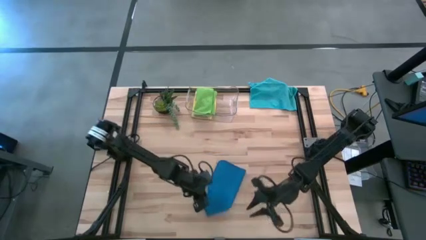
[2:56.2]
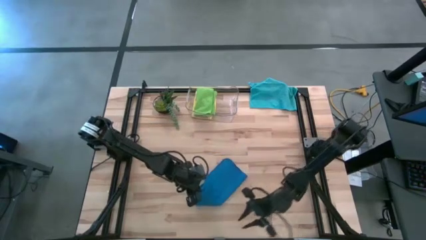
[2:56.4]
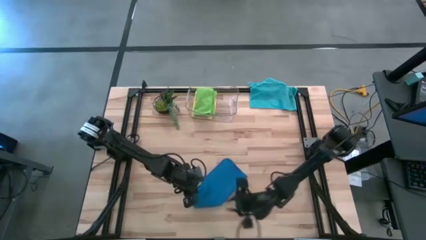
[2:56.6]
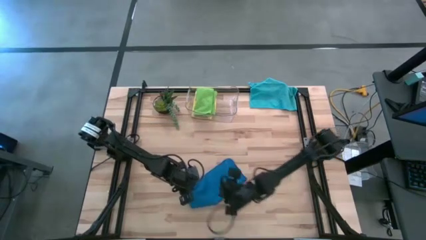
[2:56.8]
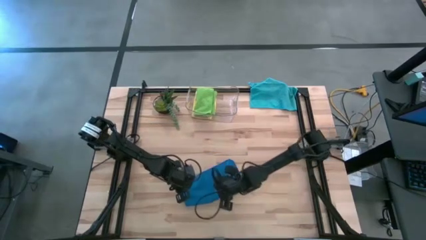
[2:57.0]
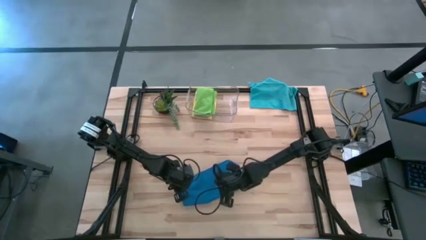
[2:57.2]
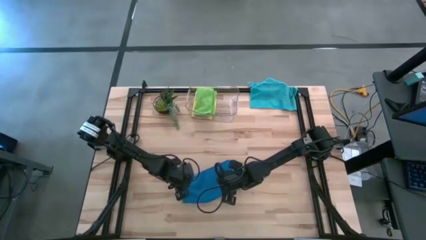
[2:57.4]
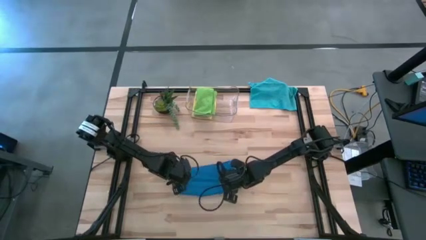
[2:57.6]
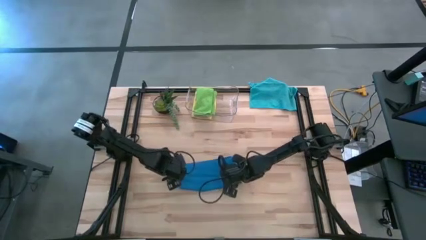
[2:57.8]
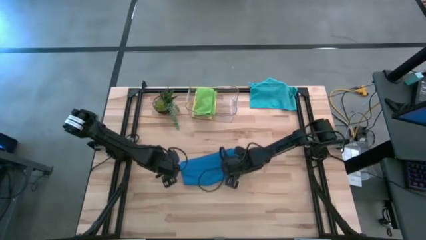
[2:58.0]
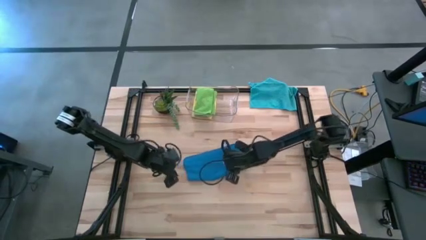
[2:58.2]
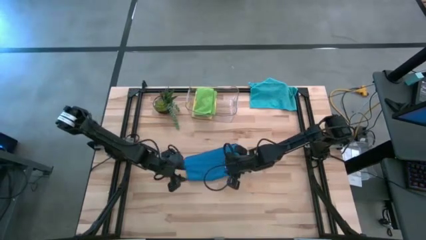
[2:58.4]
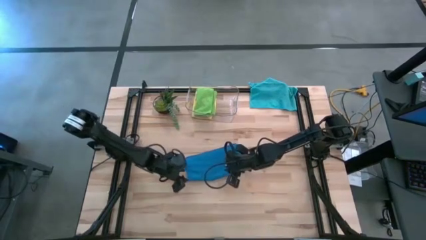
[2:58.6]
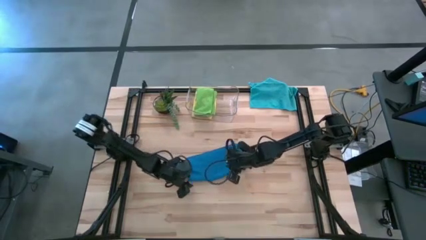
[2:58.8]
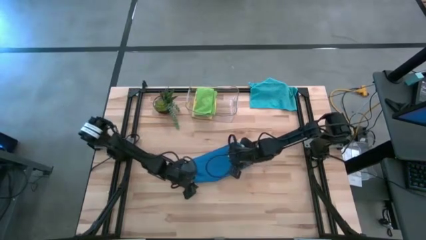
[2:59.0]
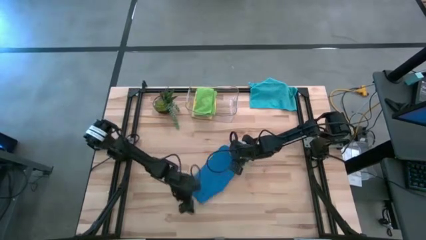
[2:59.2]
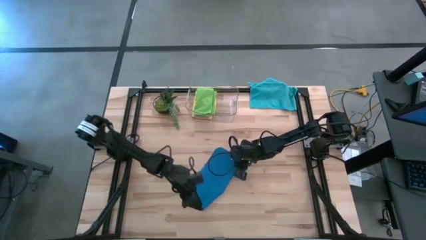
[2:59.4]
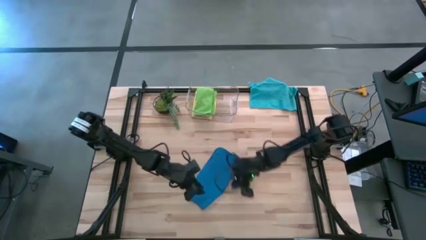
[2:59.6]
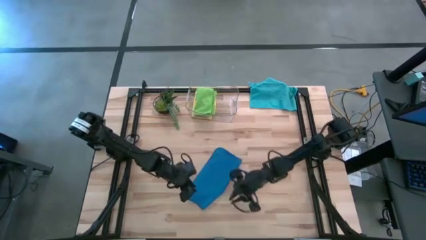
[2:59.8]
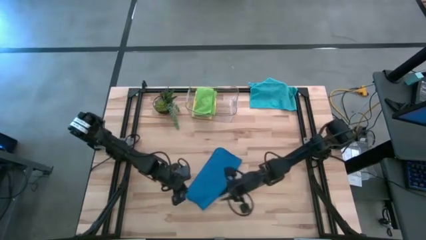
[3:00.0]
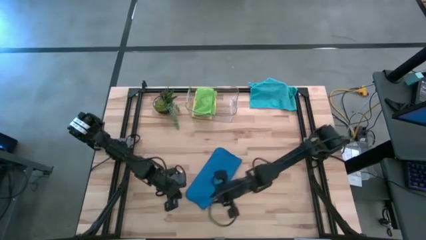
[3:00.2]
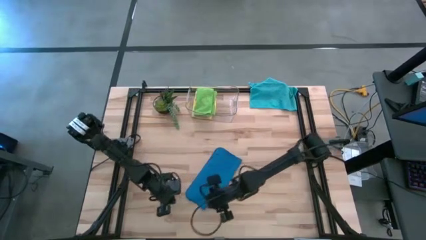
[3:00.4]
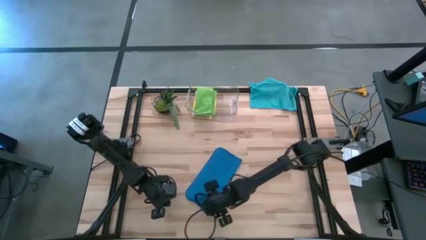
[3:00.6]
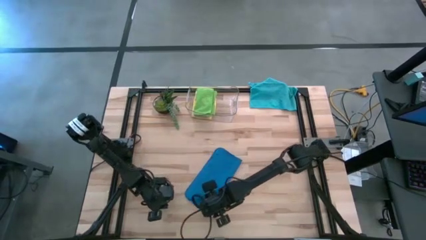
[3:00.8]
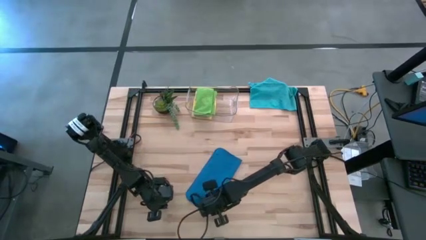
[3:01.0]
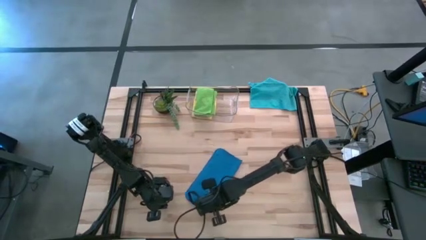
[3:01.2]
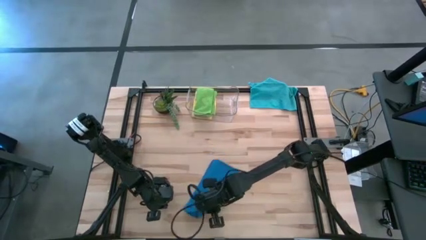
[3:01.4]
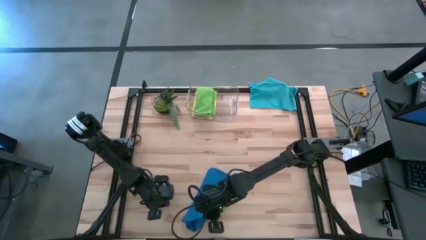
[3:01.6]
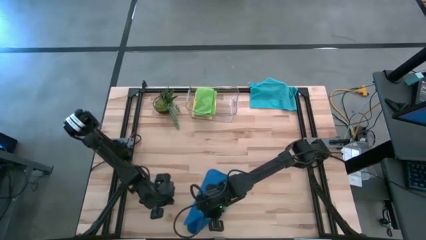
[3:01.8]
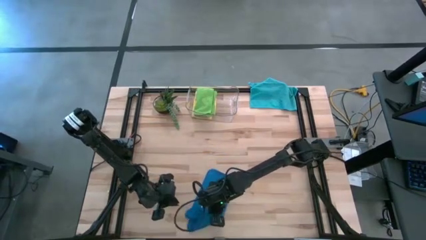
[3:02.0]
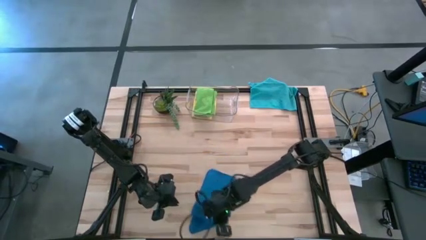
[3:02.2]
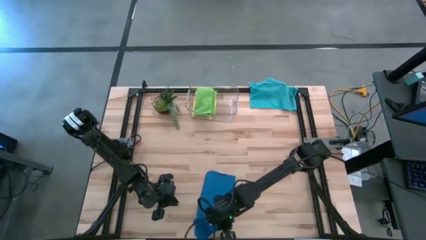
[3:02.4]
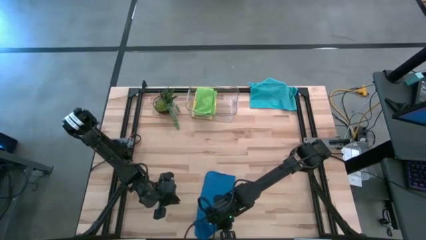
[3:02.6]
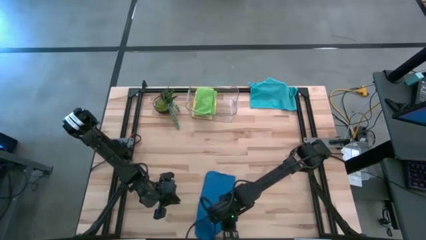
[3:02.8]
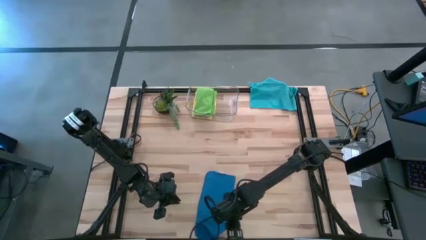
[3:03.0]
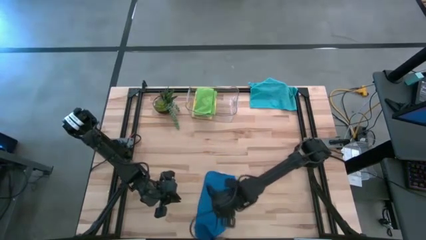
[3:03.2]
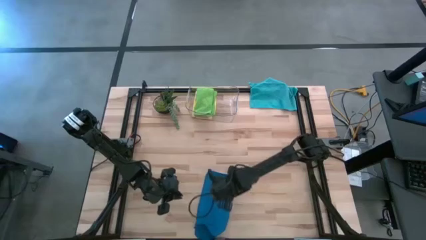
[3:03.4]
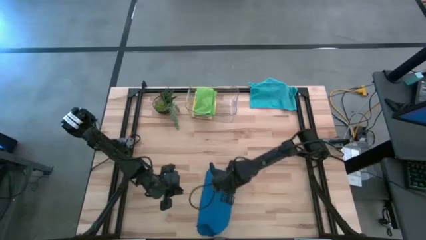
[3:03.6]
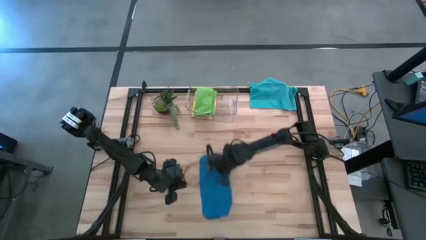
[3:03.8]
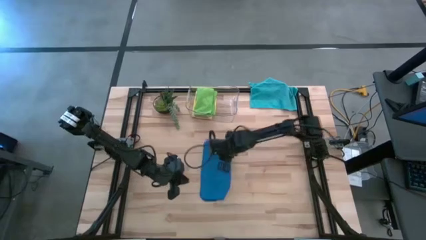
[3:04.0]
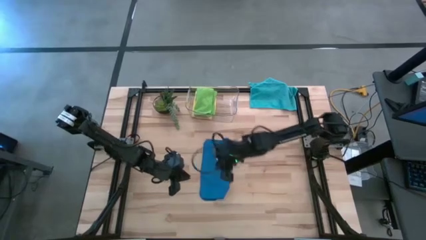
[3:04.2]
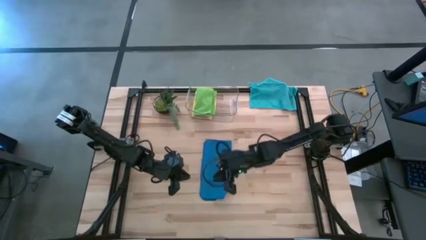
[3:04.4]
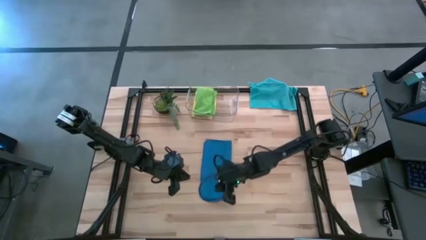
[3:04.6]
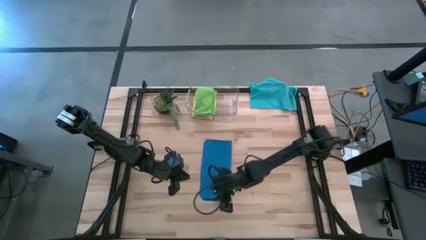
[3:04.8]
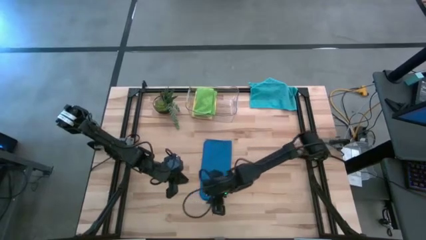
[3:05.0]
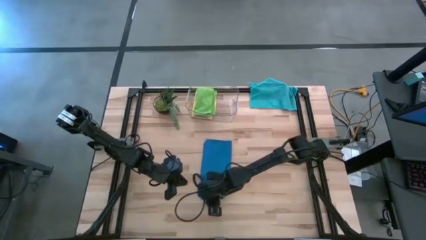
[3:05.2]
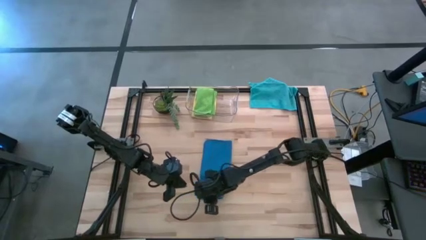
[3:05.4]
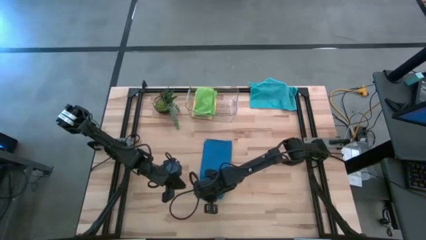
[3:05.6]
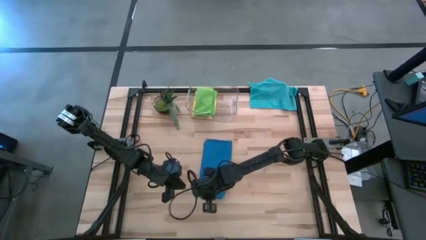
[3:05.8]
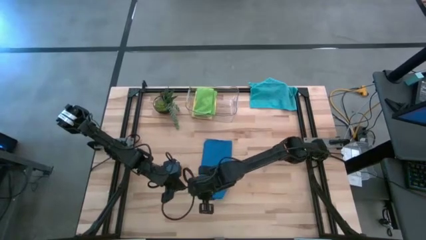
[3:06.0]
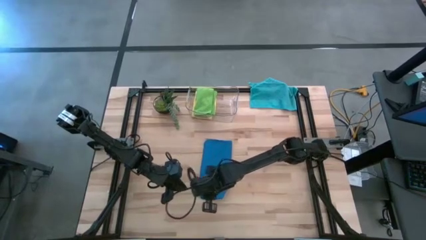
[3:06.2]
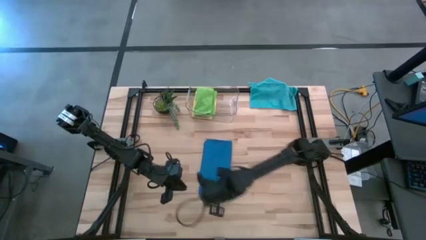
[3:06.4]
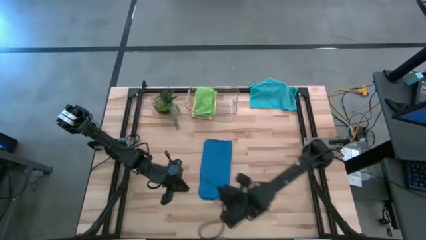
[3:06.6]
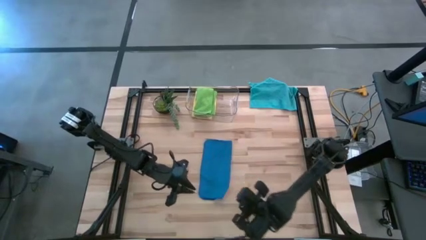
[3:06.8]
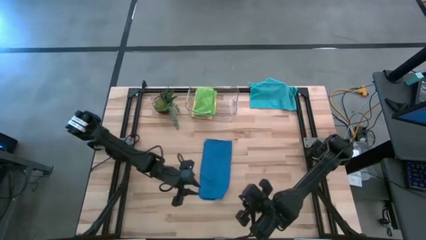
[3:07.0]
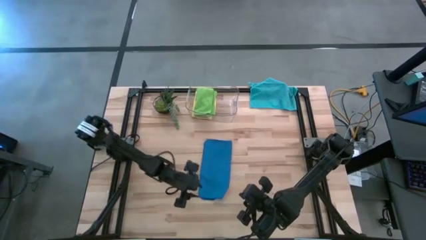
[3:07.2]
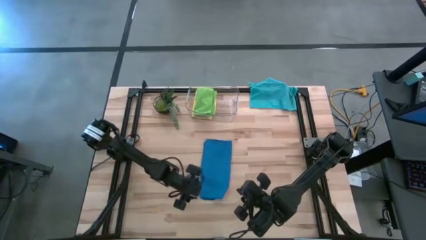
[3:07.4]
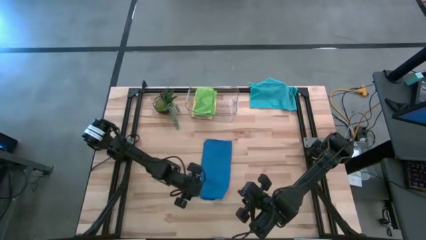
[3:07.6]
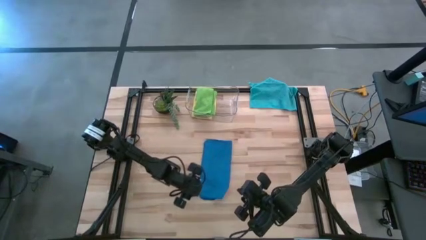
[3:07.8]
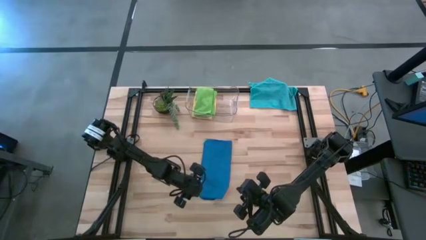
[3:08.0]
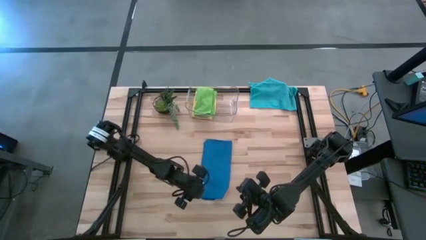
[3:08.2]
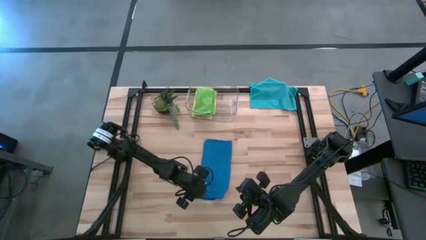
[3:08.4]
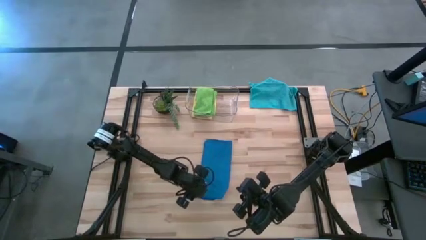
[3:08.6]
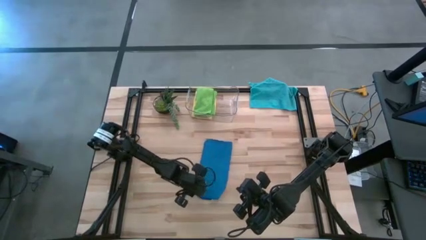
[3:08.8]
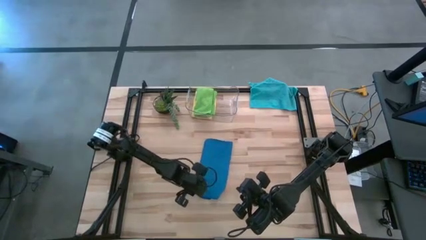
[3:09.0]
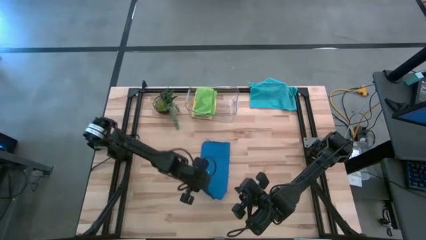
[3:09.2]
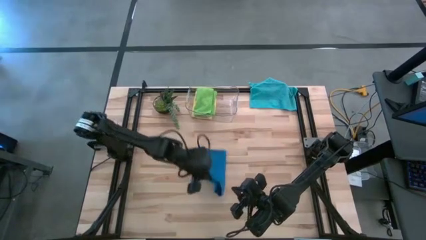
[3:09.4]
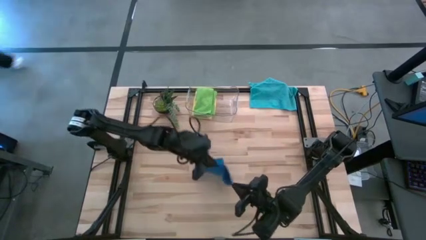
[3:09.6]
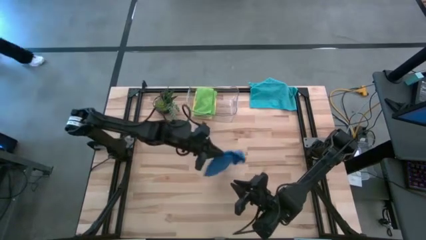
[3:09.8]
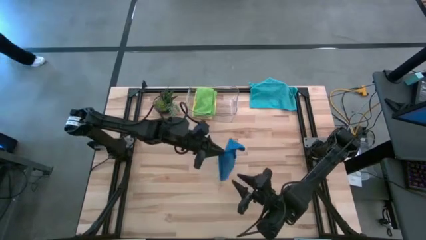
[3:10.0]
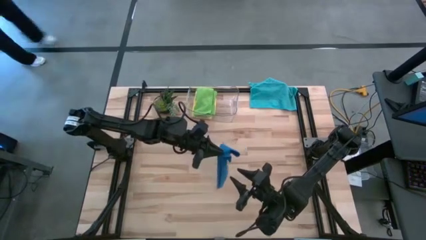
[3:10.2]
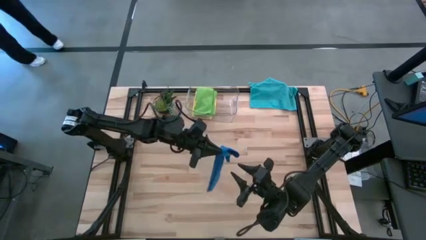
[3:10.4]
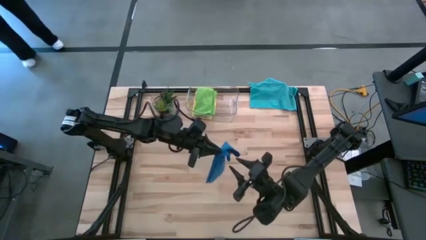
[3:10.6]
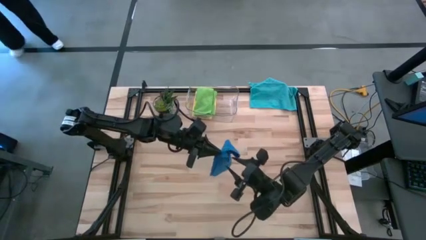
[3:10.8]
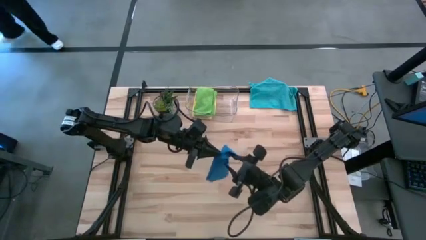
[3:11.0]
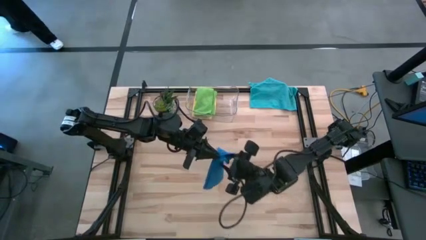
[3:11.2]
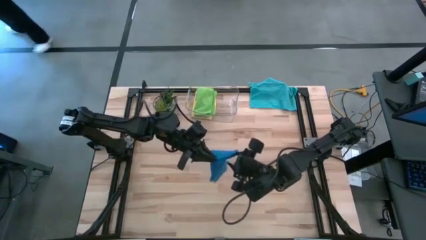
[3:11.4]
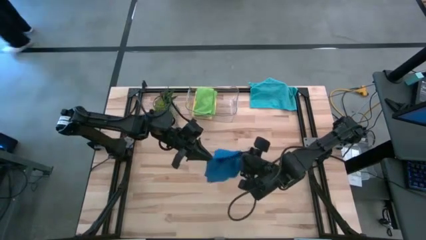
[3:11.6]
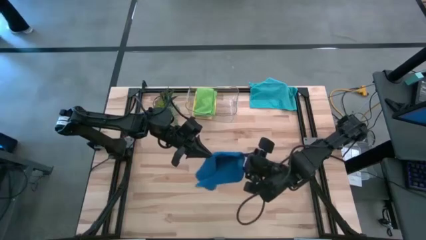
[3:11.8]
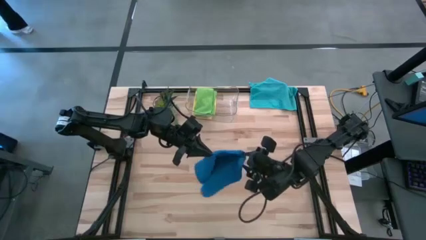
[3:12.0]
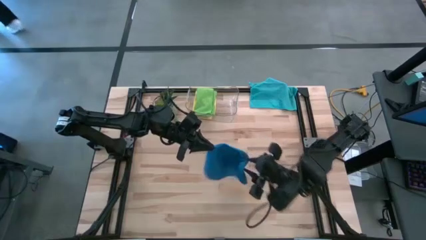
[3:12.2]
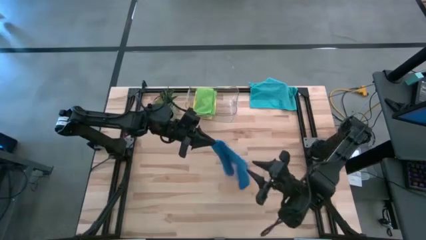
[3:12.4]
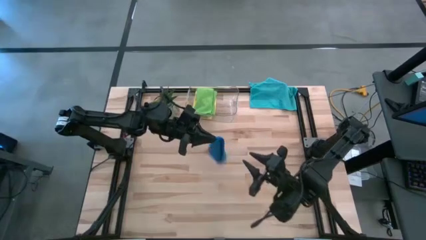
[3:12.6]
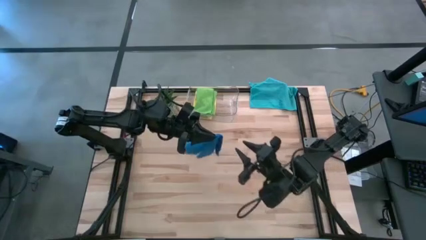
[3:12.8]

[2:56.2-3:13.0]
Task: Fold microfiber towels
Fold the bottom blue towel
